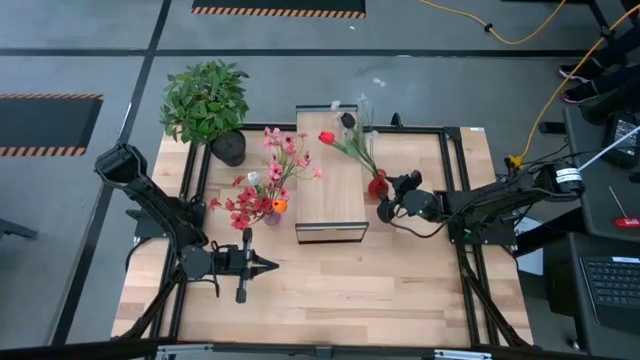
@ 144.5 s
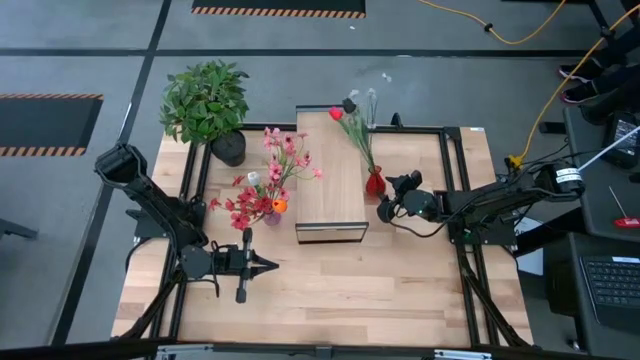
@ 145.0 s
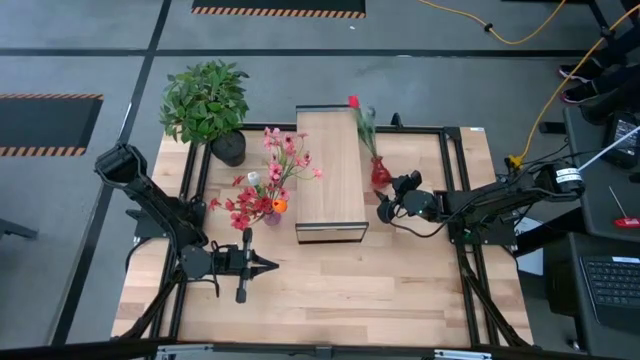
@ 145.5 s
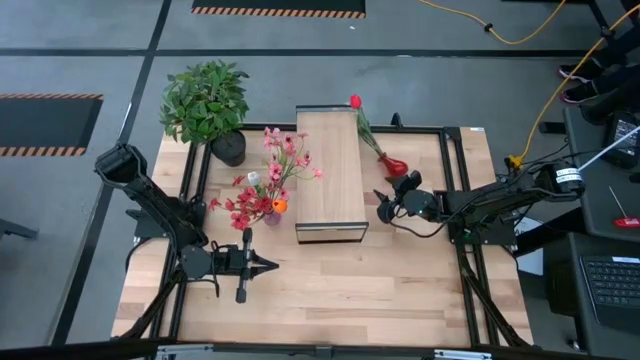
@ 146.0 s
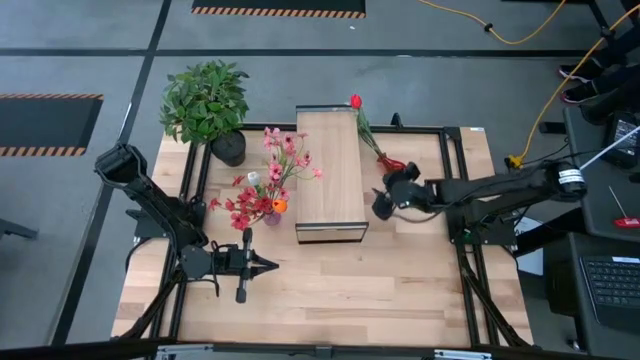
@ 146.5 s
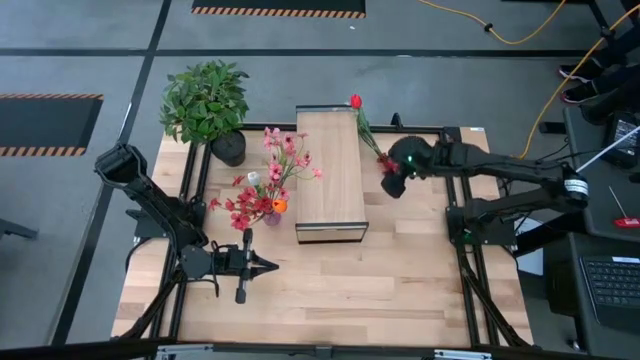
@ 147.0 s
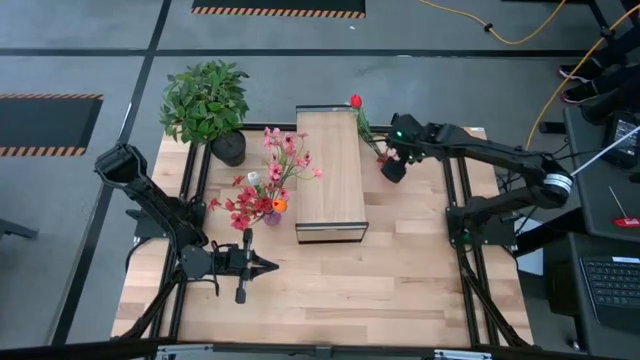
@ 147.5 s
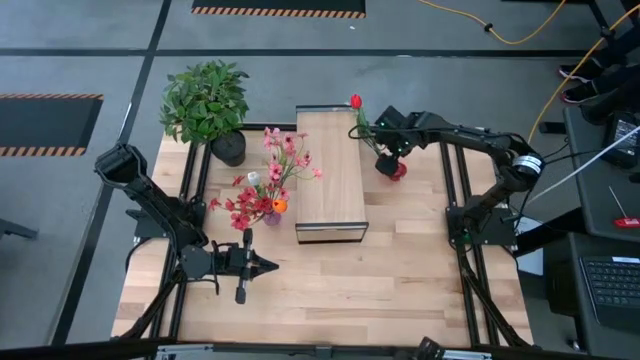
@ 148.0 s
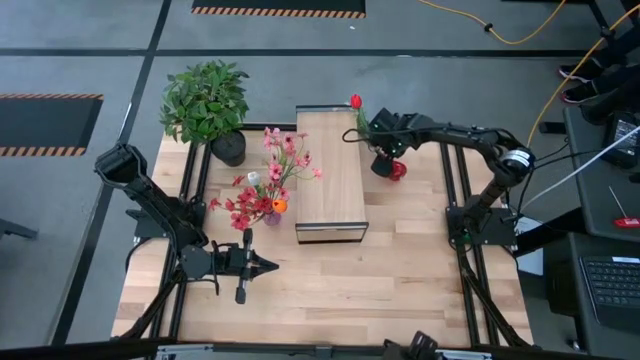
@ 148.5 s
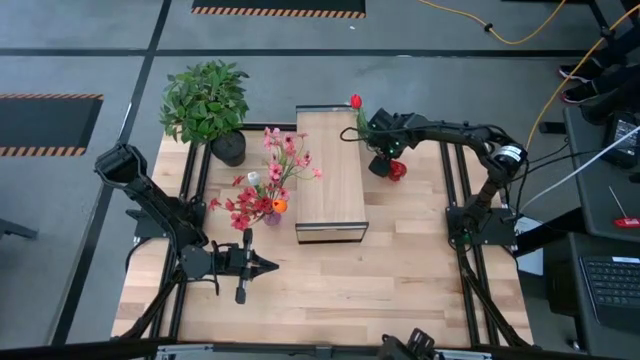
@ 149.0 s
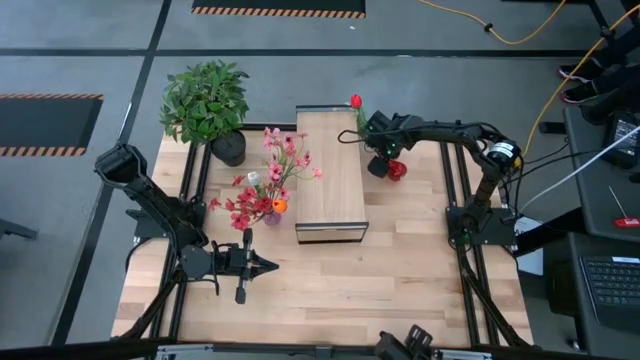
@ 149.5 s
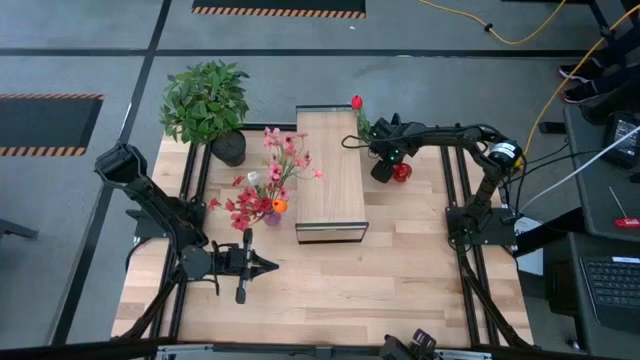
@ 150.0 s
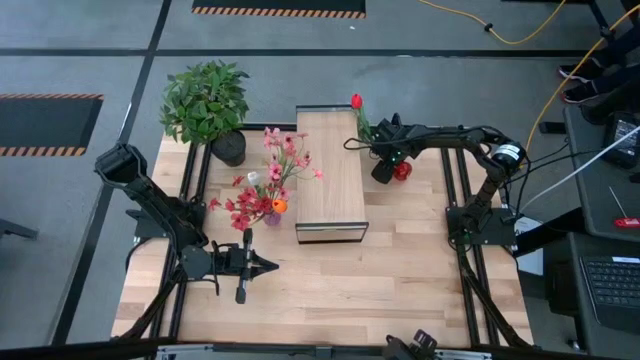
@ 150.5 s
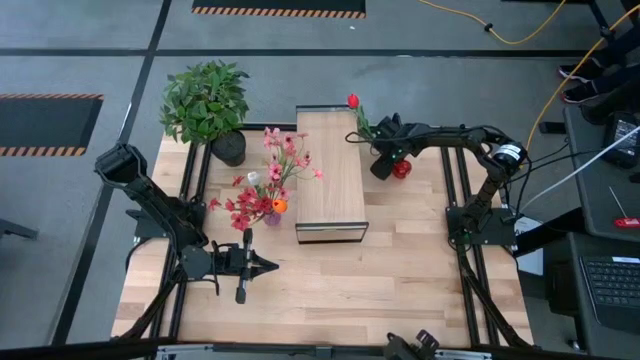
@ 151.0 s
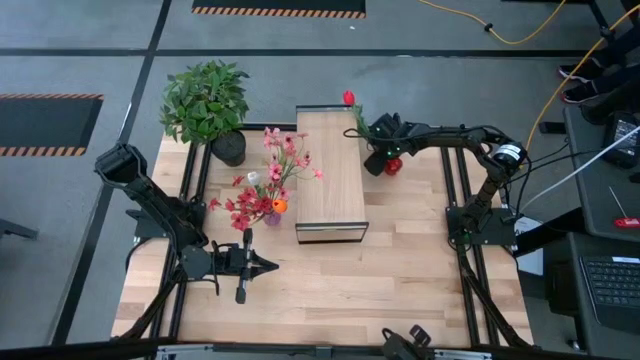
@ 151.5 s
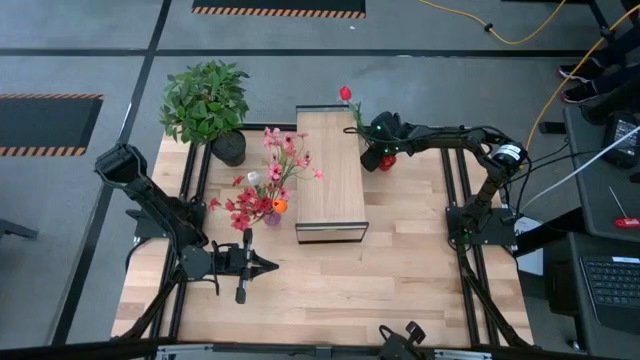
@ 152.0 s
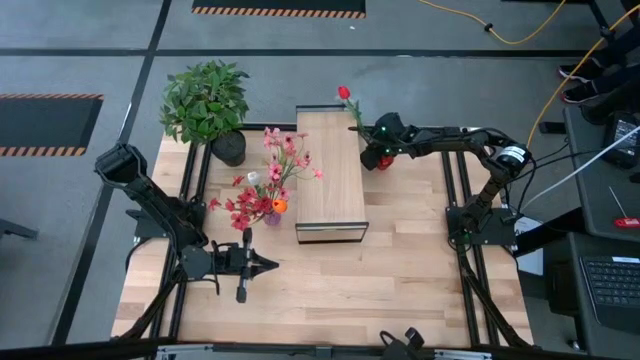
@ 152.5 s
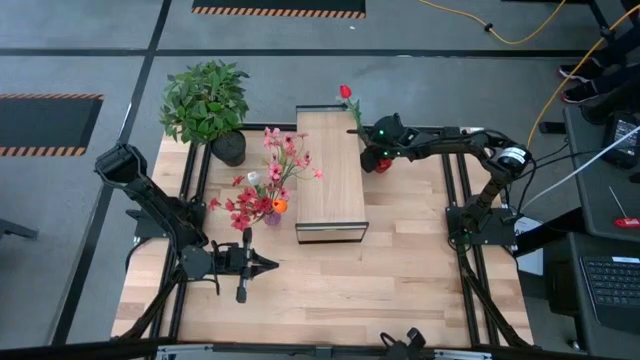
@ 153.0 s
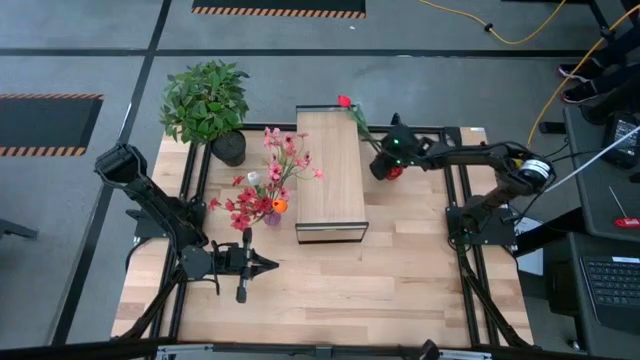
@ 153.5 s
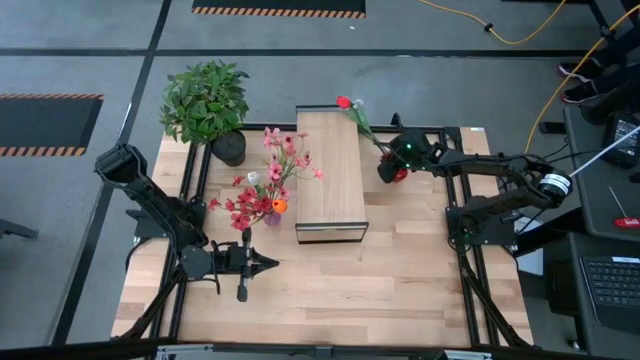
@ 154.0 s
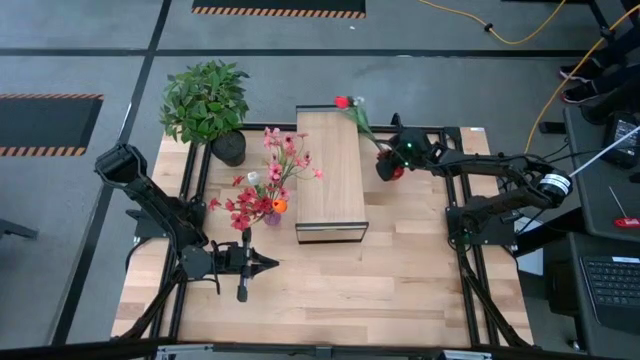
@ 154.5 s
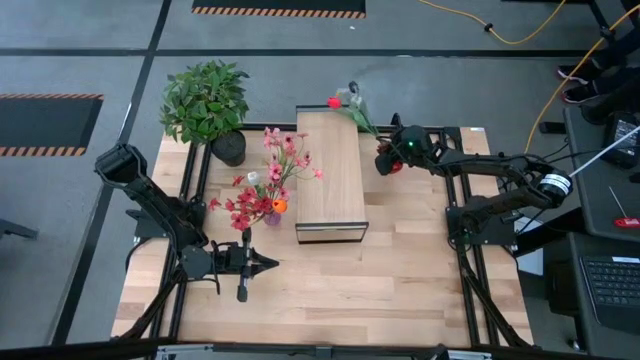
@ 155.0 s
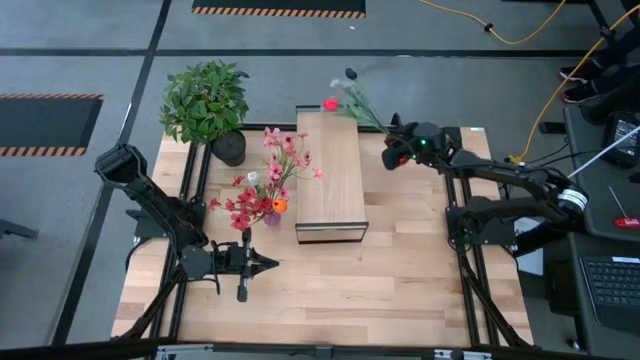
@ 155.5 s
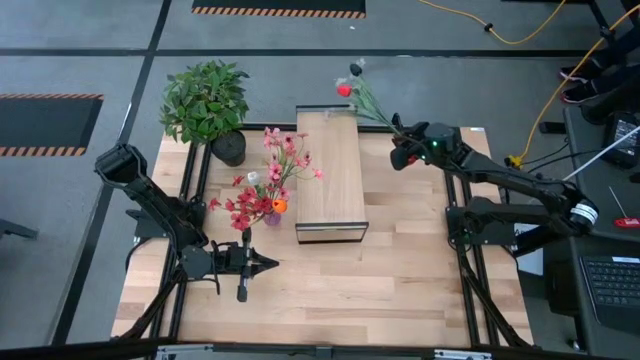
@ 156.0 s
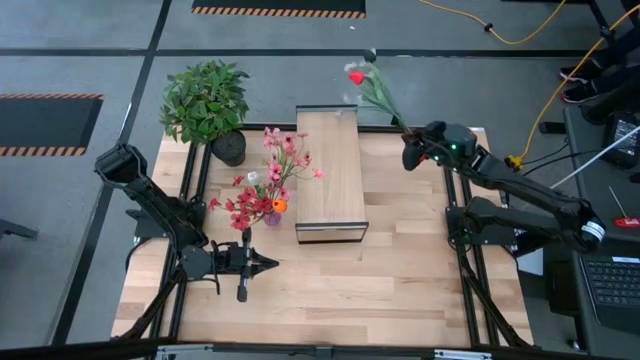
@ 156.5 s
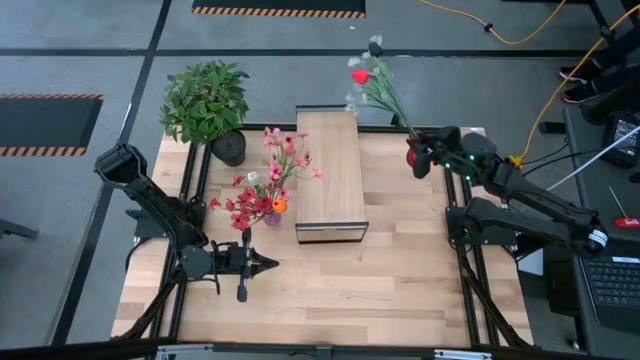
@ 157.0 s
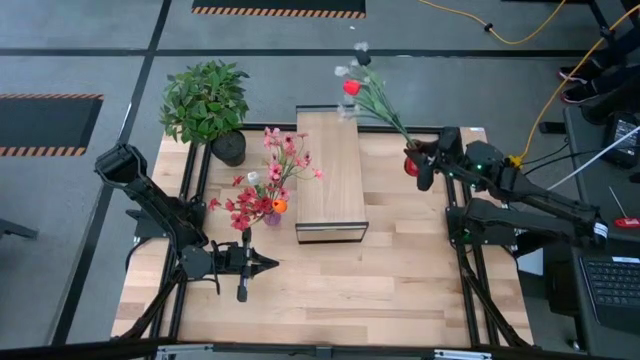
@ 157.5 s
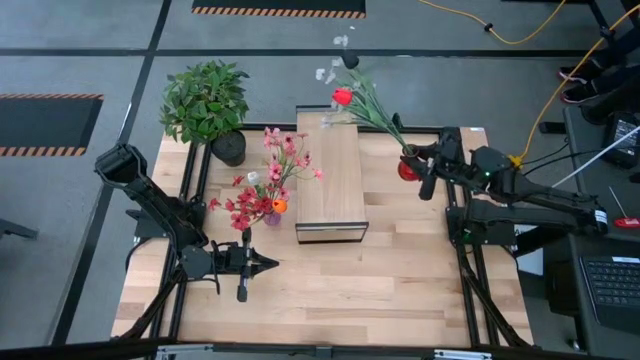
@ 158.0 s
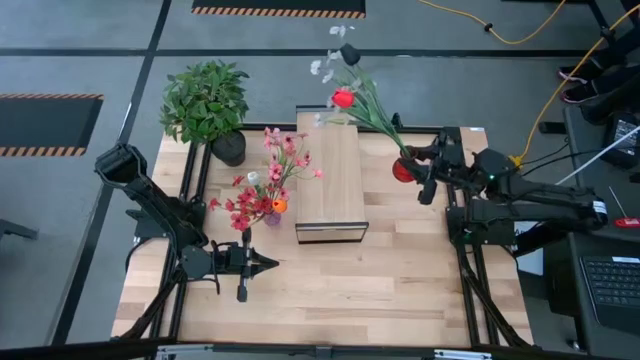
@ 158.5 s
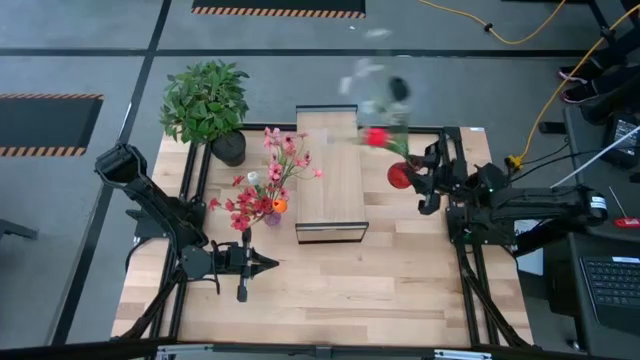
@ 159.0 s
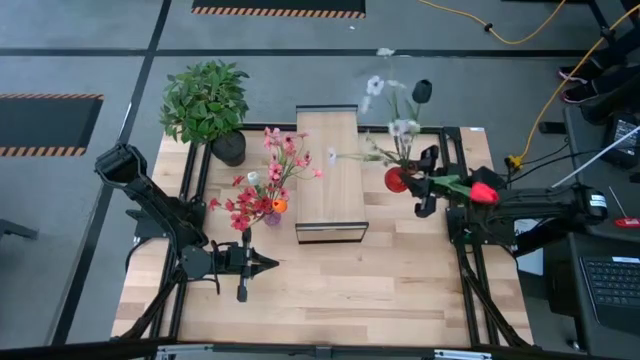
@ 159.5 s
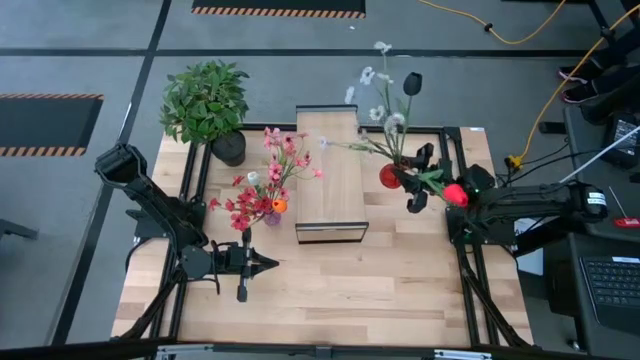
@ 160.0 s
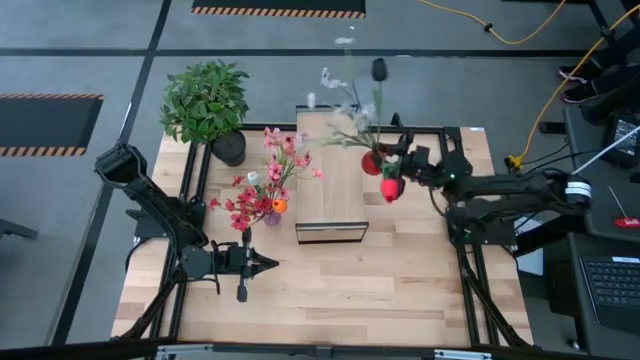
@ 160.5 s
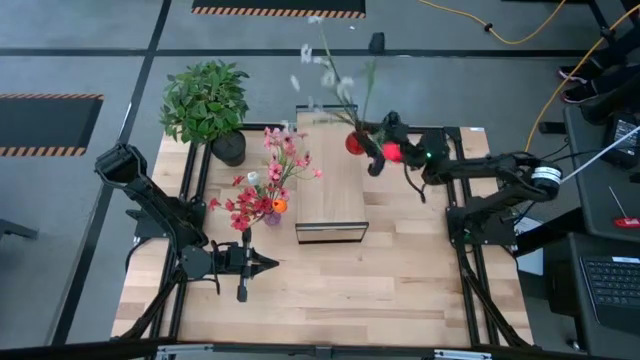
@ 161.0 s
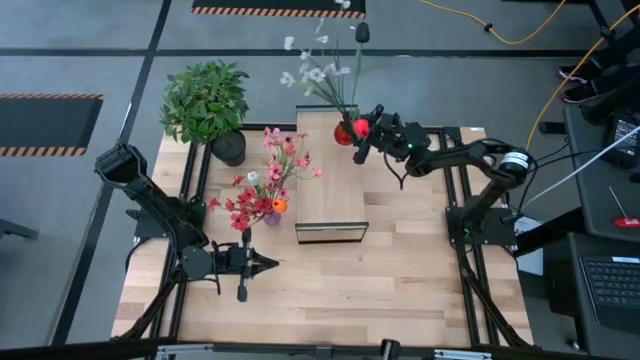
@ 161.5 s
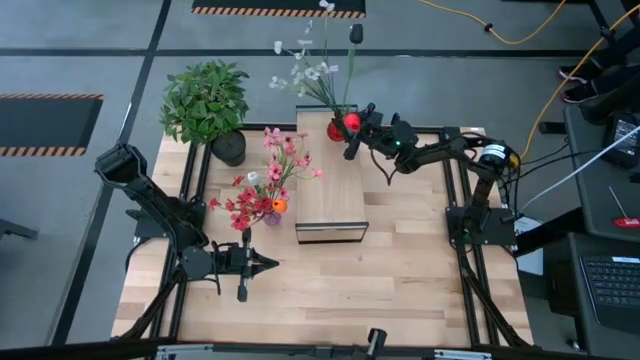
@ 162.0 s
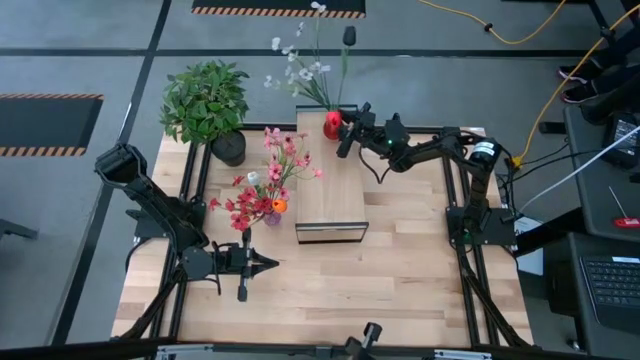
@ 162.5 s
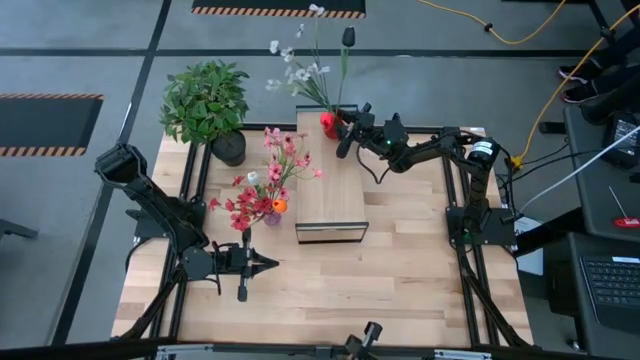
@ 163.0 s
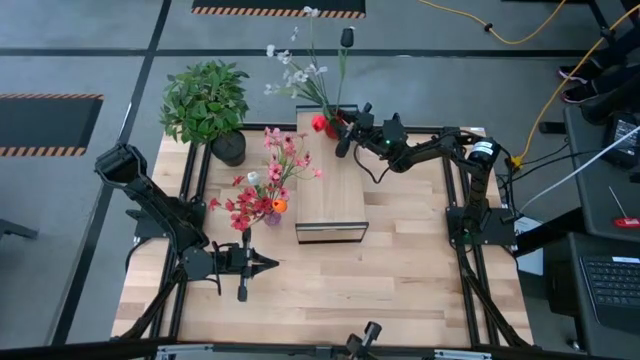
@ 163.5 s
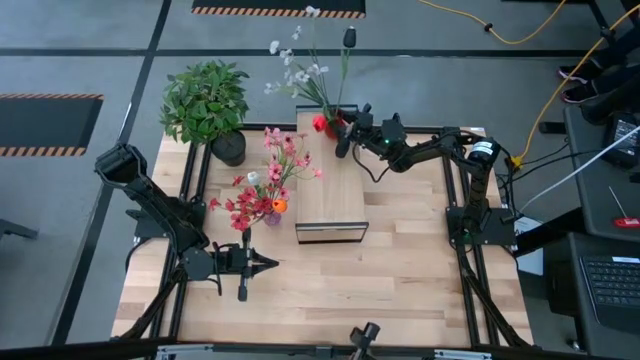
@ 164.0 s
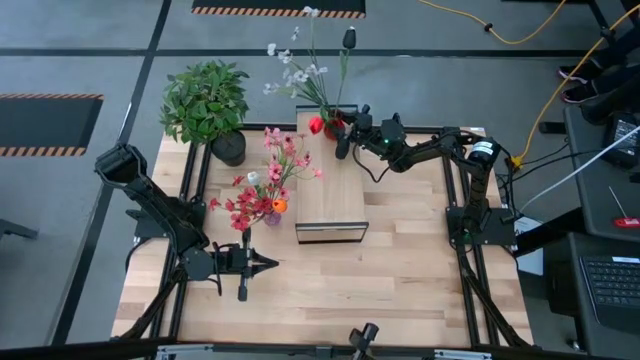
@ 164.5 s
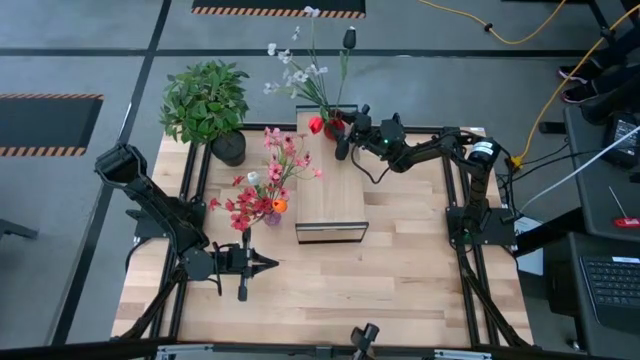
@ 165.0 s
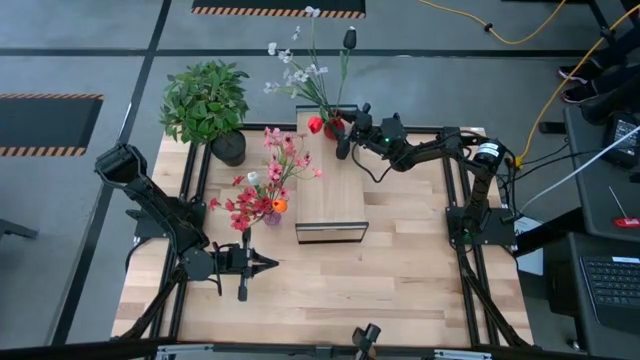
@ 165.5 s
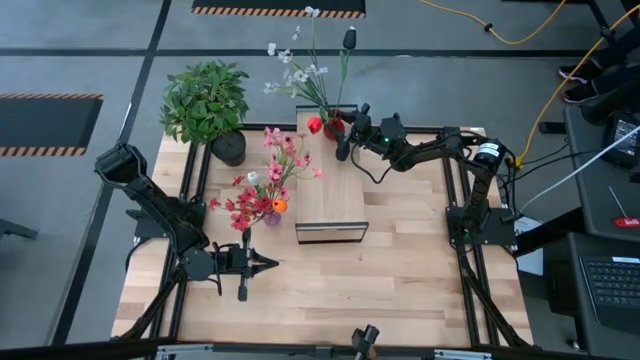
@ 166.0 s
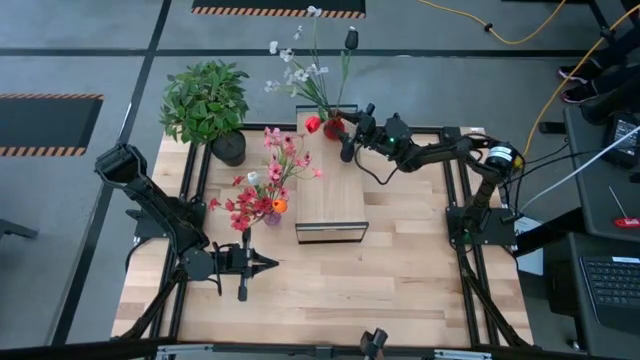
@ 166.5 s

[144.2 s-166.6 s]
Task: Pick and place flowers into a vace then onto a shelf
Put the red vase on the shelf
